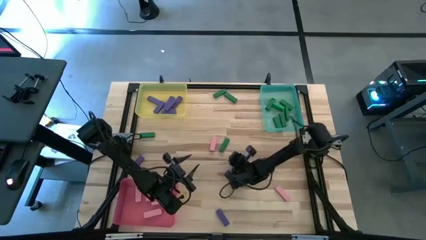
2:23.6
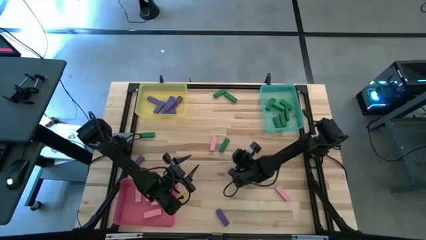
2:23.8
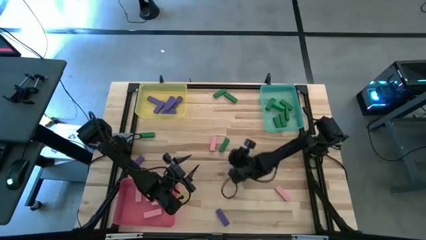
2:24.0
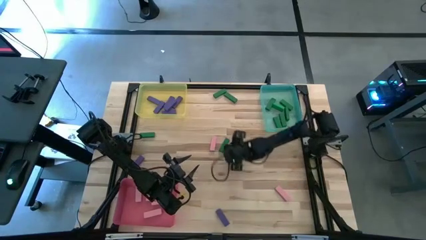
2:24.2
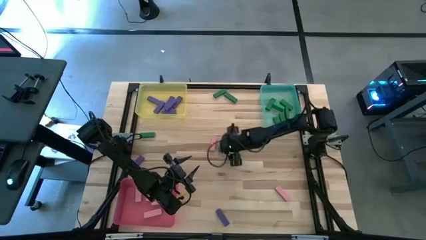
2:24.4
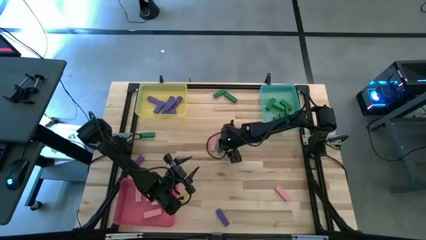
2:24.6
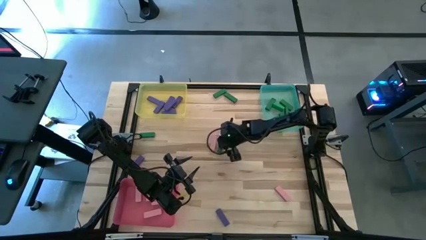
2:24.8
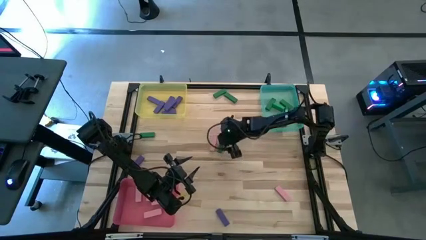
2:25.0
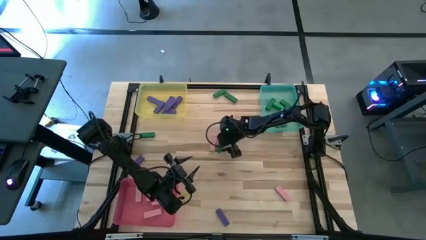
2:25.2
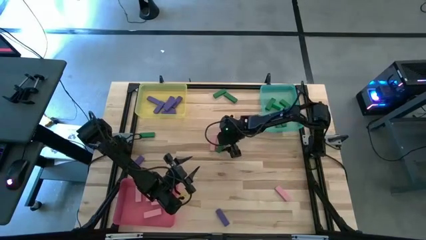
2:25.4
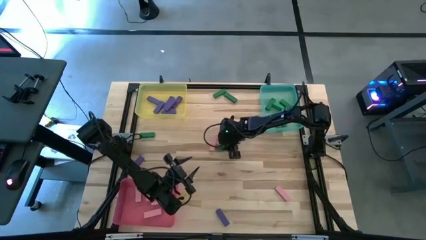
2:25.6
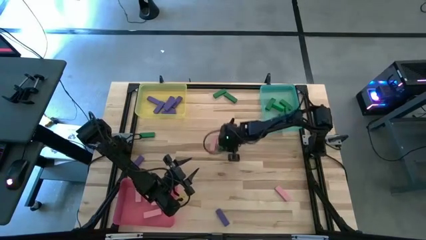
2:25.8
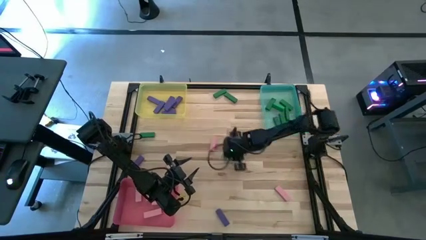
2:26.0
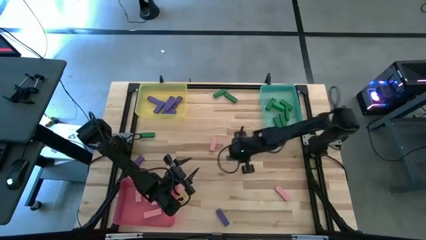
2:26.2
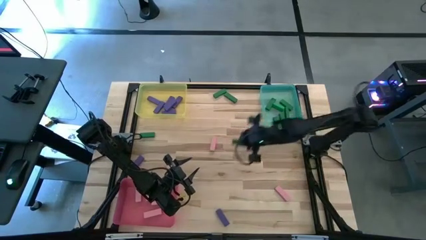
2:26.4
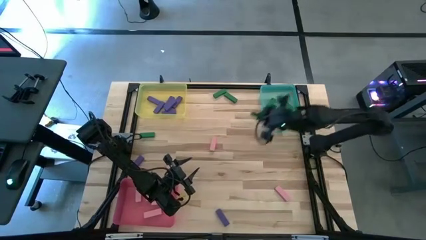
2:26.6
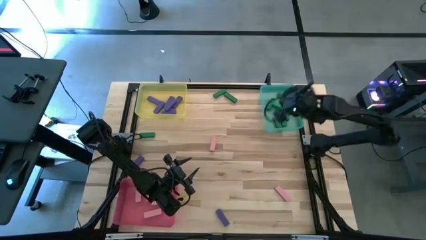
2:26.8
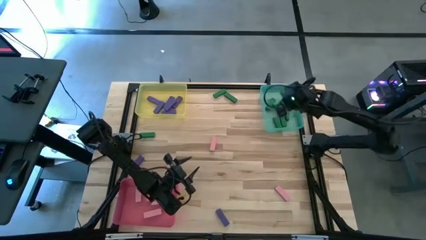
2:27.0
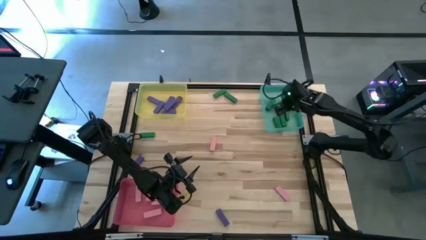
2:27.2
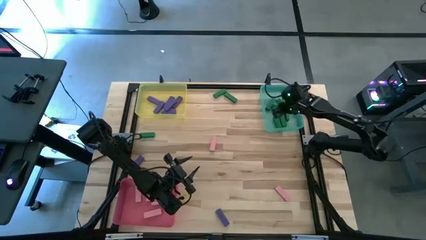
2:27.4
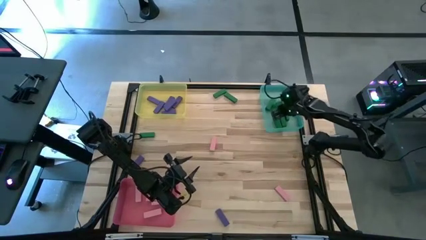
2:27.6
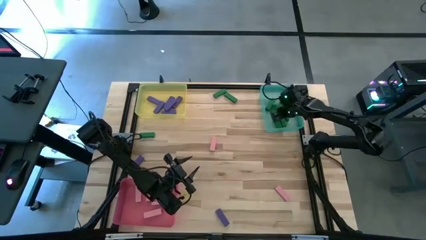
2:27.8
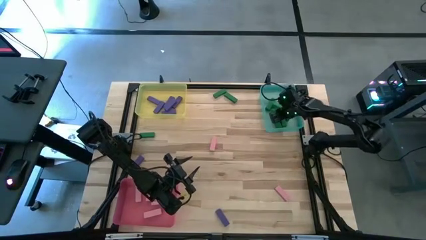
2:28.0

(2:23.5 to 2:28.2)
Task: Sort blocks
Put the green wooden block into the green bin

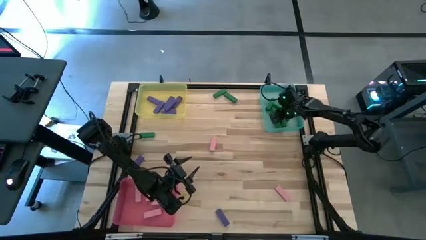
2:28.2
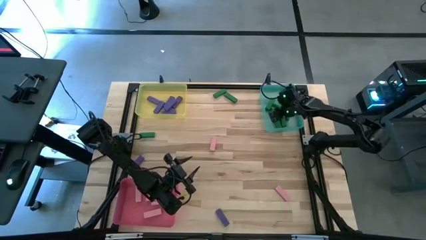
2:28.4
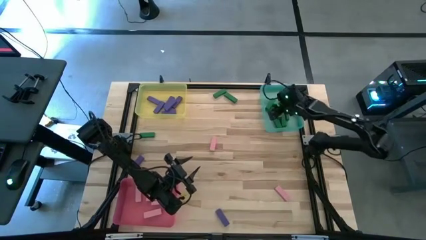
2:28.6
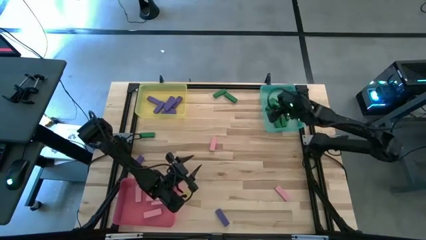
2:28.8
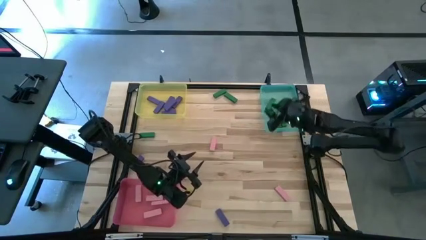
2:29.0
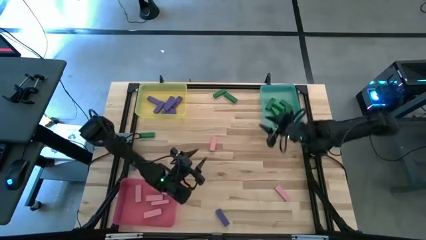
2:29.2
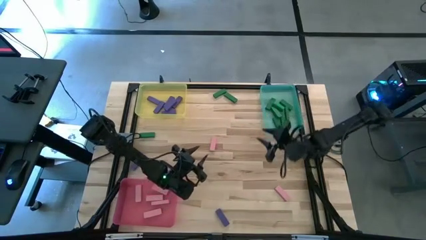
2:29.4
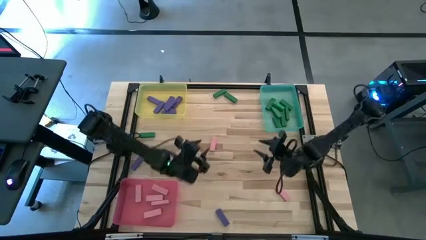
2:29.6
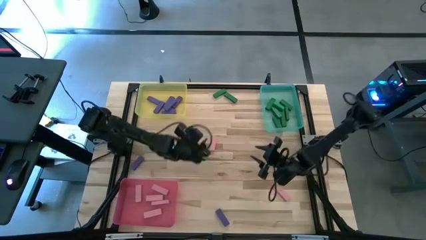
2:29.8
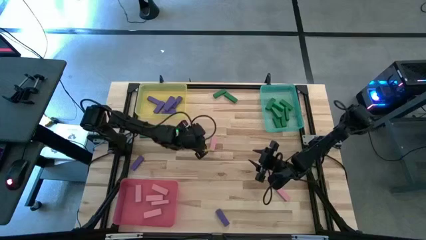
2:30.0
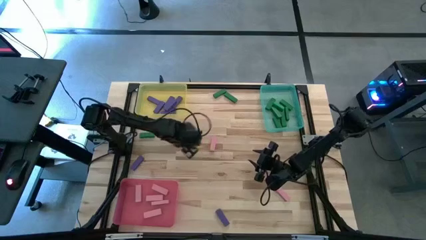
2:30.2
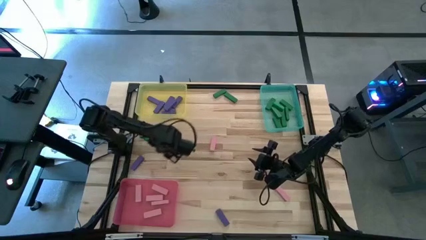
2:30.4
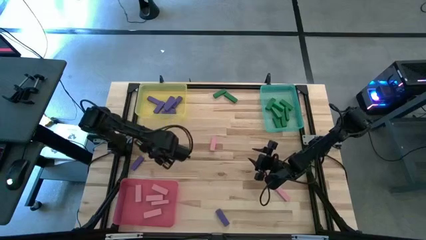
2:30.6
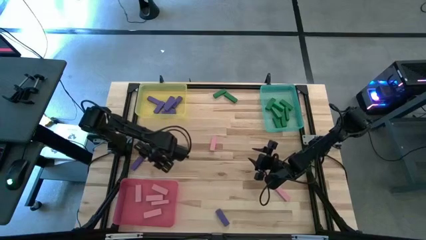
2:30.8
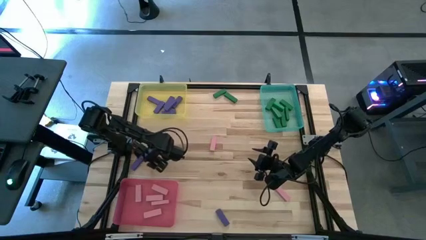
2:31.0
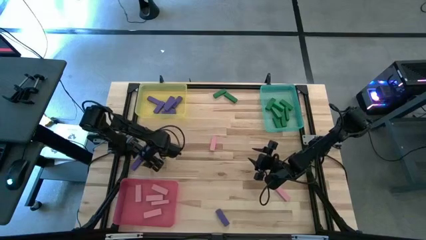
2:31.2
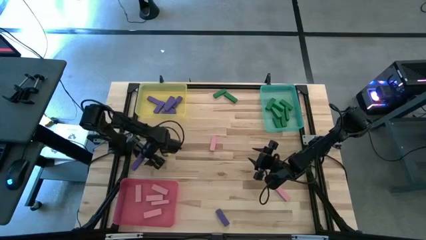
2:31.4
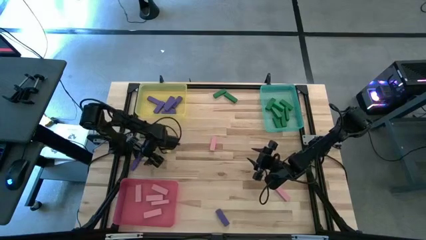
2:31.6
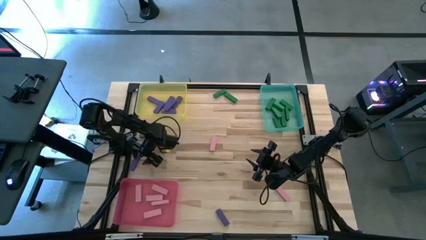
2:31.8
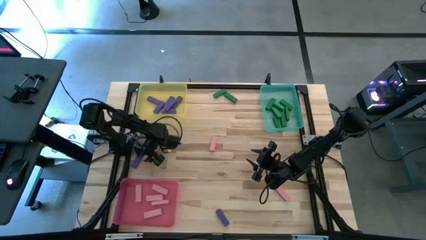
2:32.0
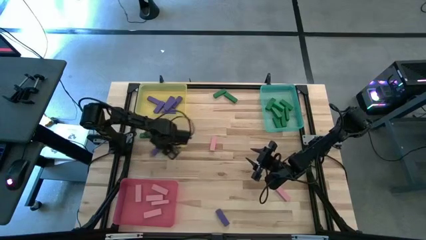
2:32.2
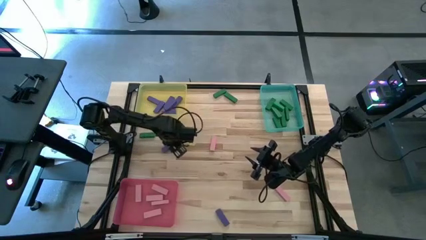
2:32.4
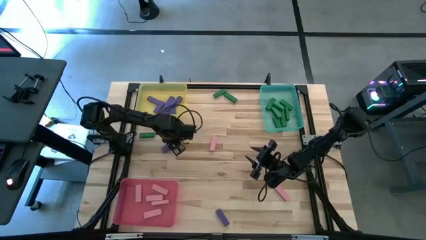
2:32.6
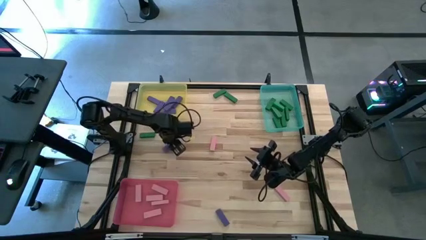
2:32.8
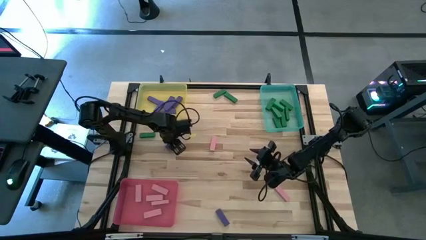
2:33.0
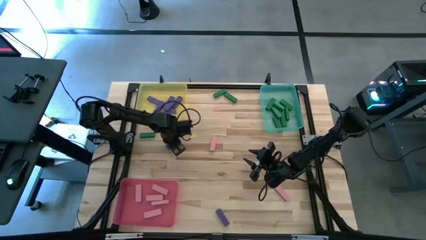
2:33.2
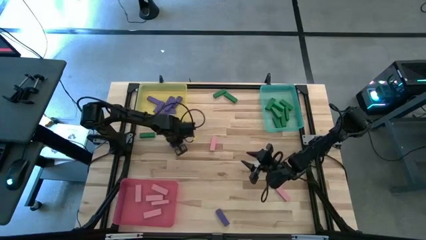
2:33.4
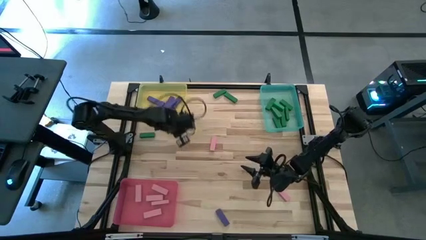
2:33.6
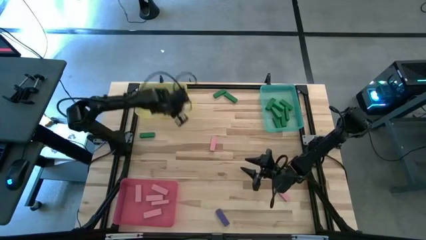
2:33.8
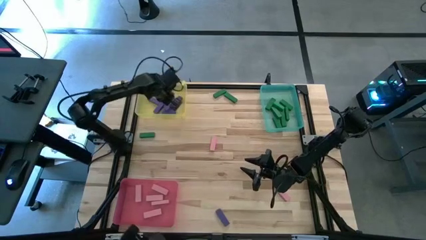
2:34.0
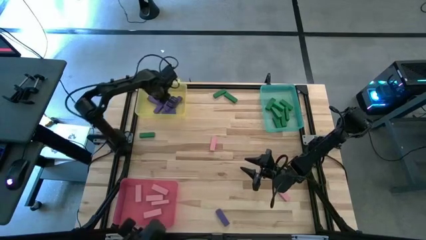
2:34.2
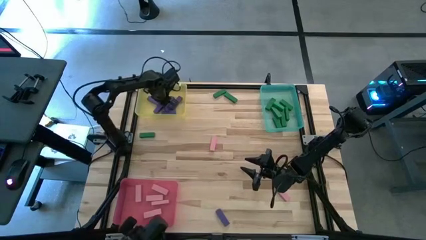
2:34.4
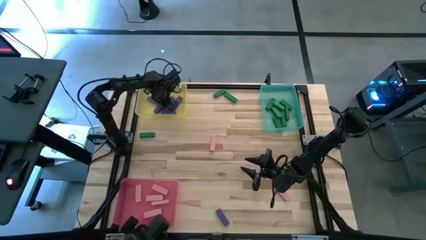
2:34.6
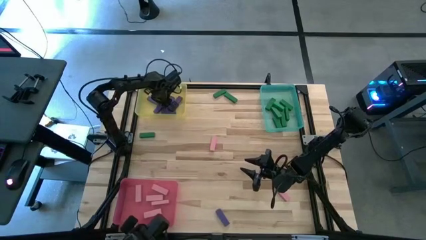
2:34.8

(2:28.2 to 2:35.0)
Put the purple wooden block into the yellow bin

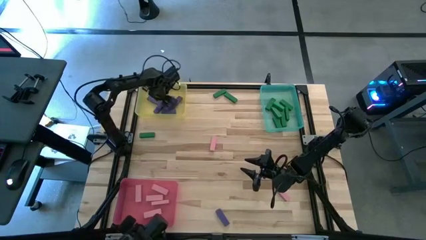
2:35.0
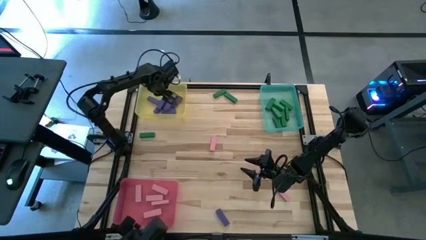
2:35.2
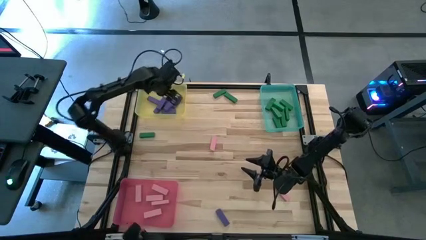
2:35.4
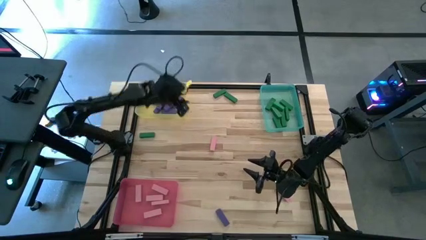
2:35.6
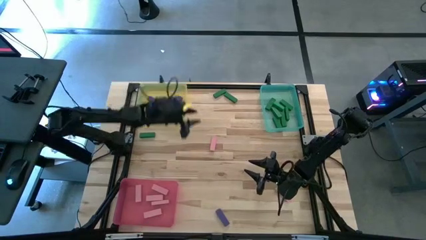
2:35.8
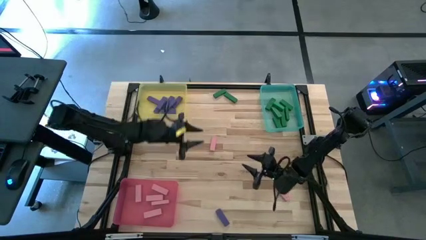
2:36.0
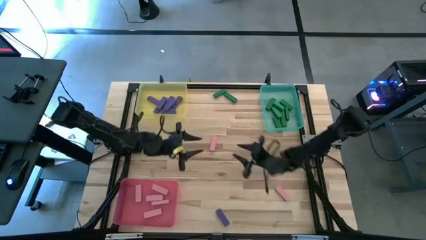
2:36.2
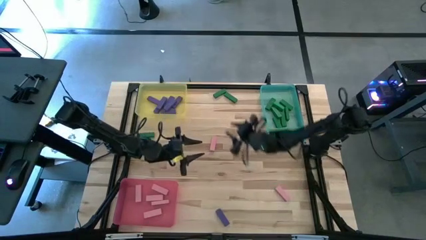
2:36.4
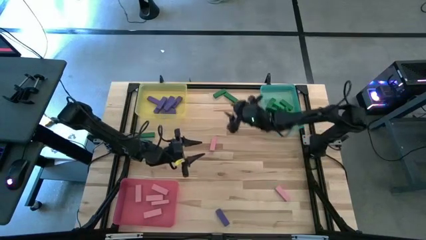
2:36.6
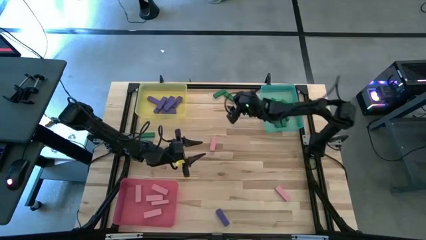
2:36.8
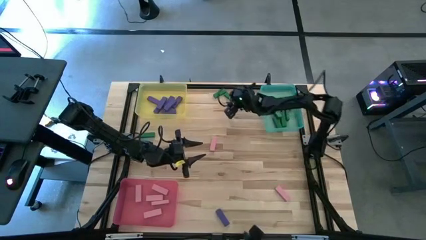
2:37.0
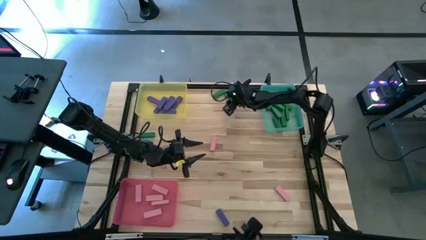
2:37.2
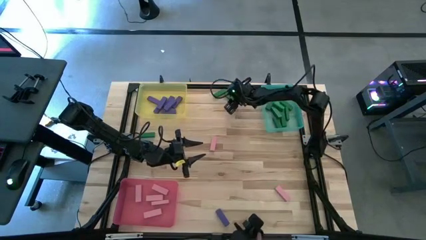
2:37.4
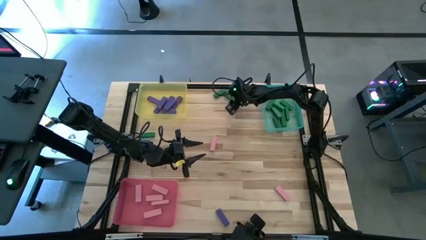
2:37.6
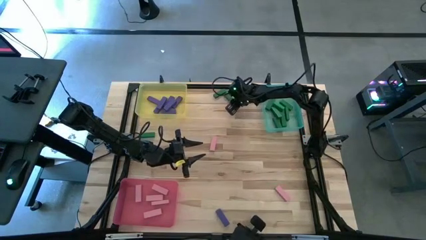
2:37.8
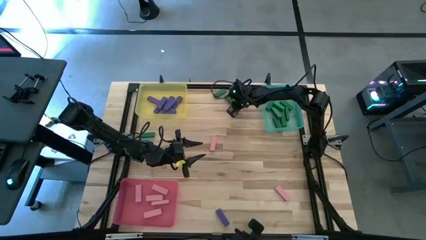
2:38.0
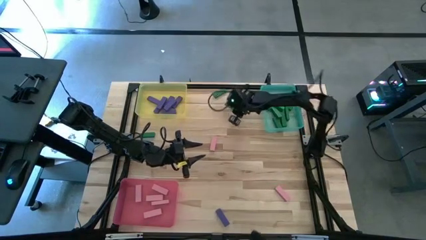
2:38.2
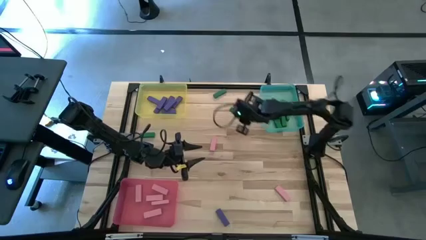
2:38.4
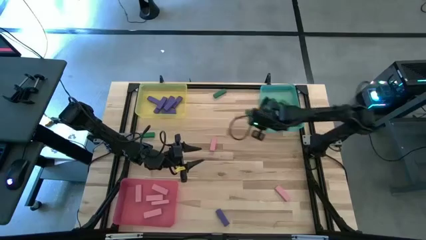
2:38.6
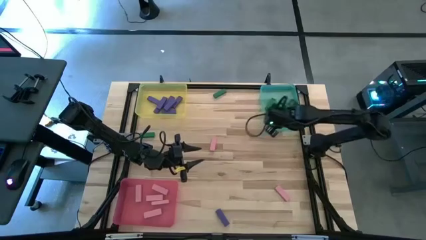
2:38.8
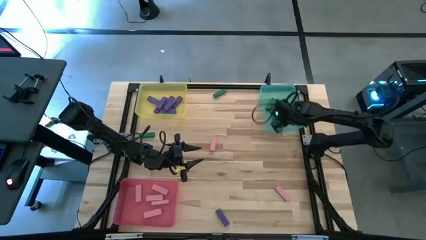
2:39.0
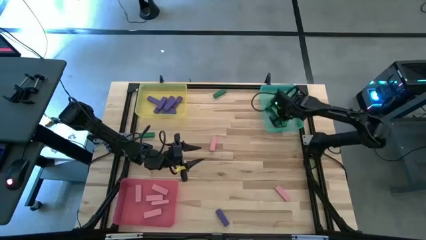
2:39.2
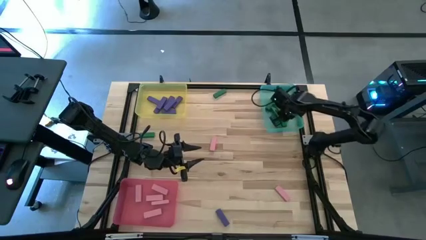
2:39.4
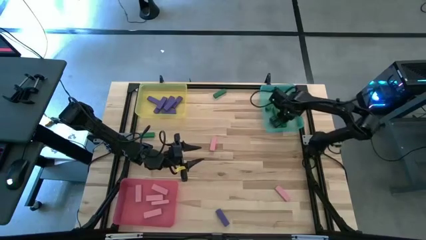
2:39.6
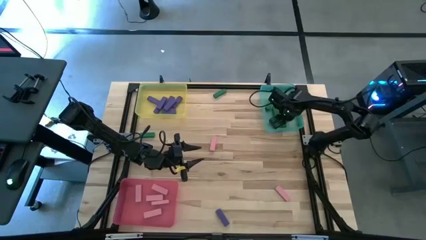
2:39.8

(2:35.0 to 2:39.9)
Put the green wooden block into the green bin
